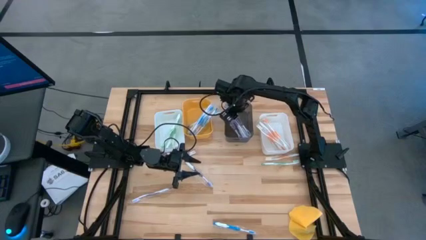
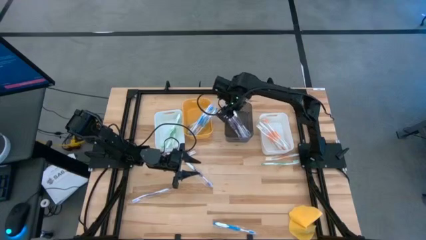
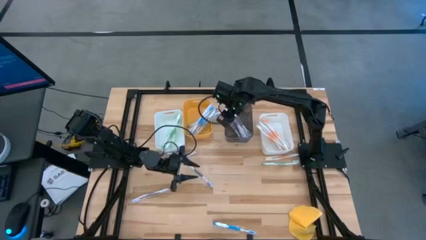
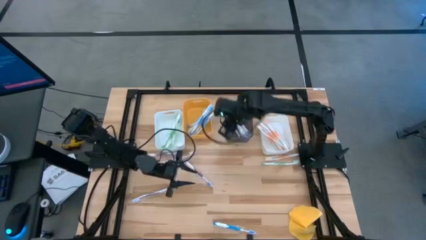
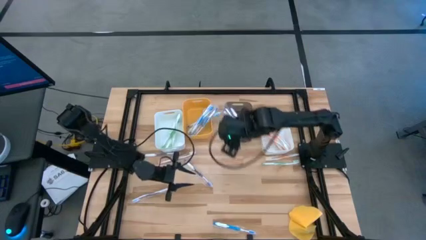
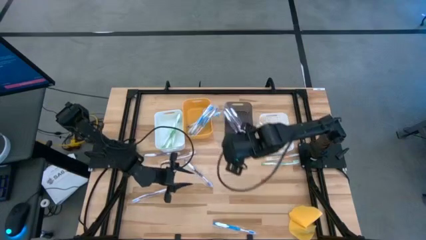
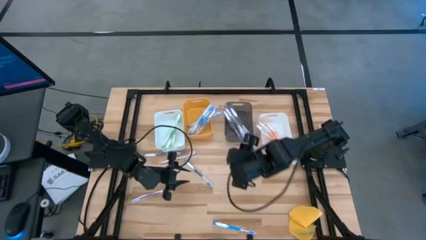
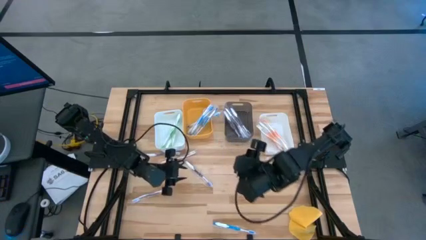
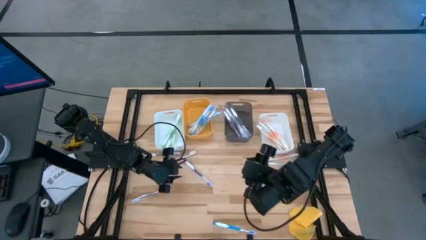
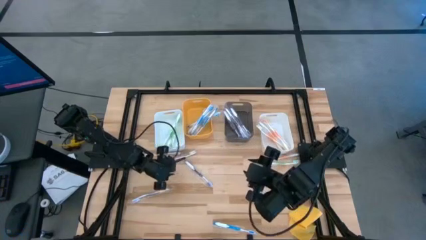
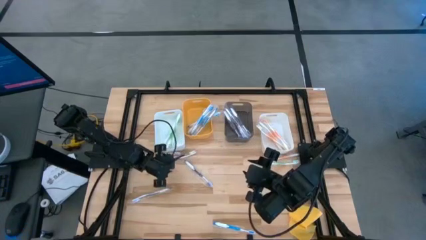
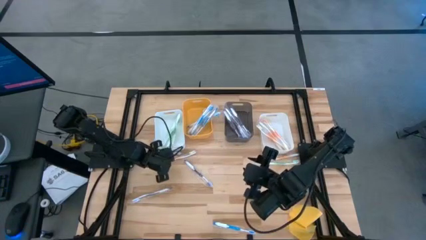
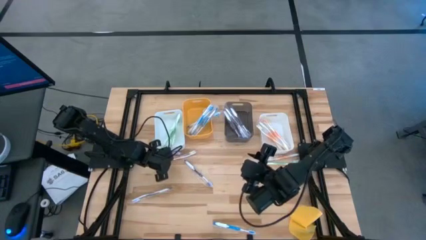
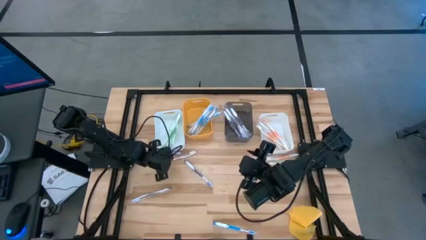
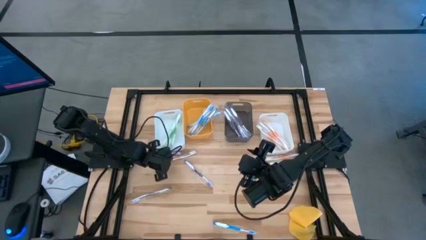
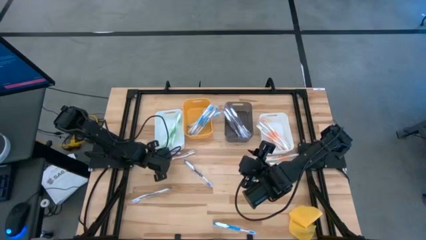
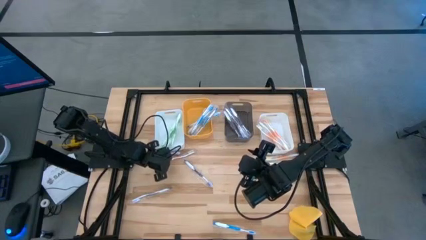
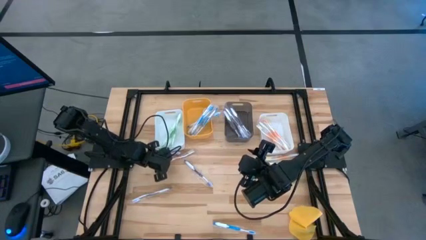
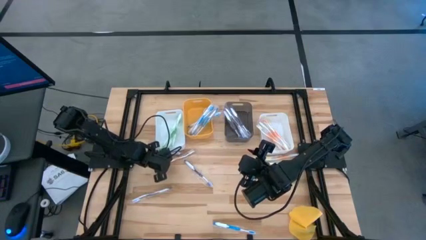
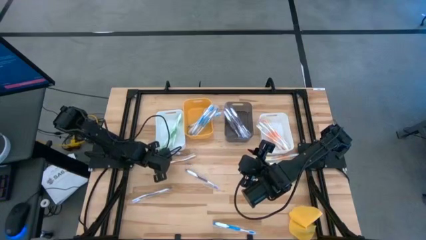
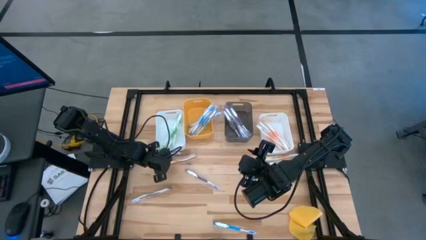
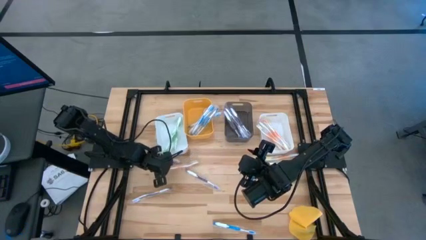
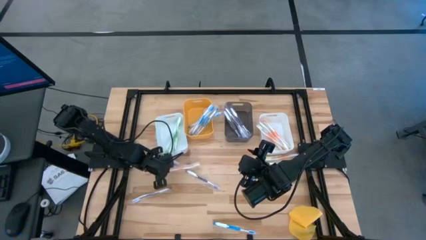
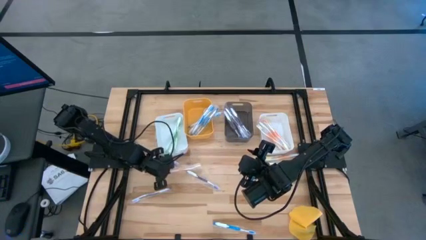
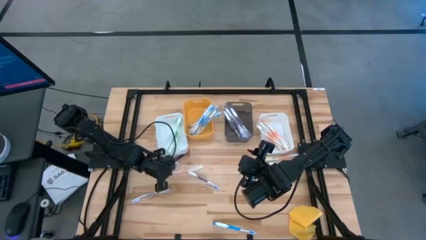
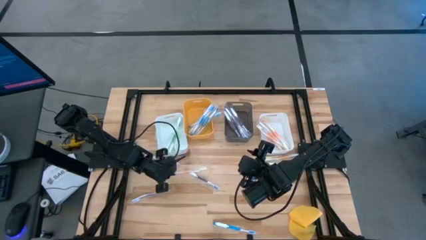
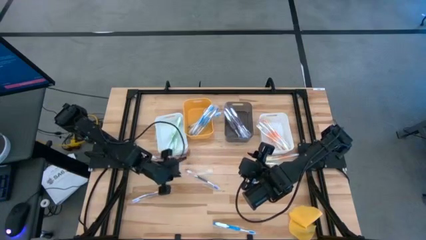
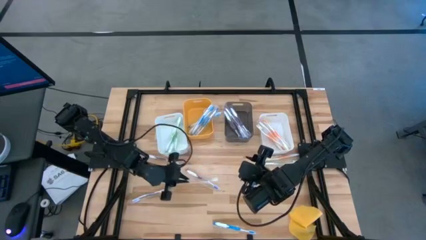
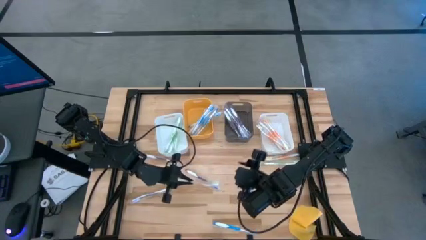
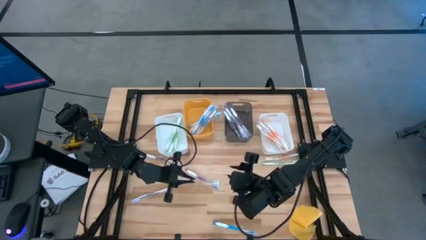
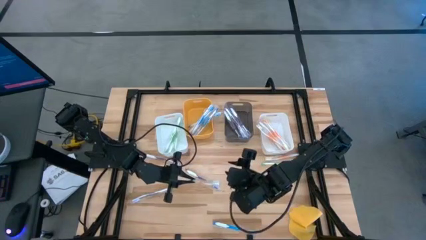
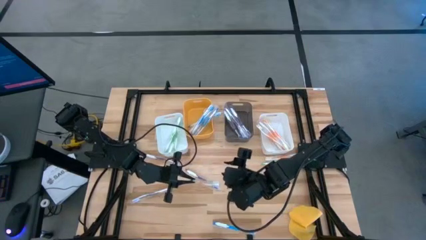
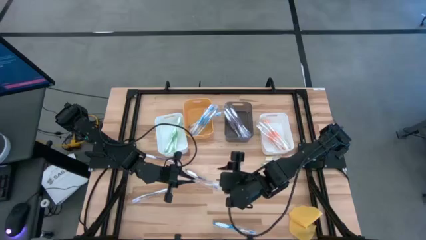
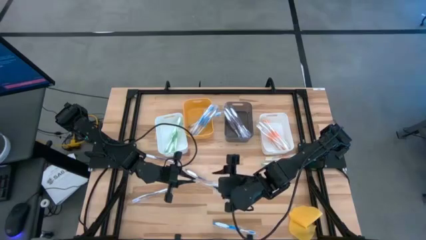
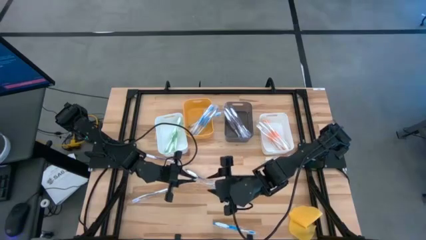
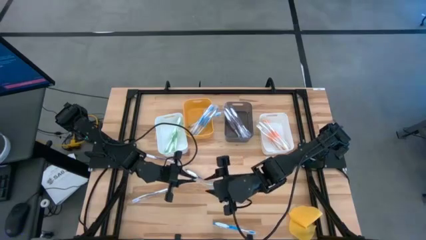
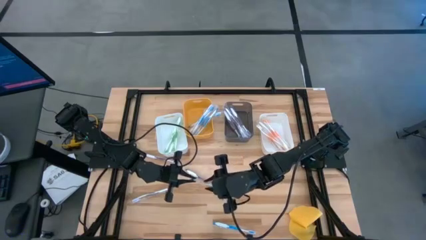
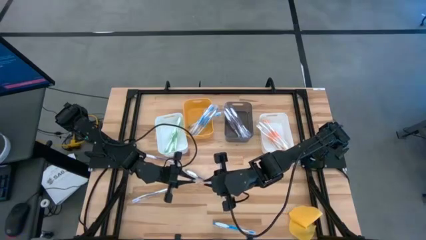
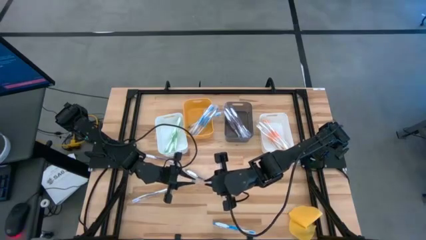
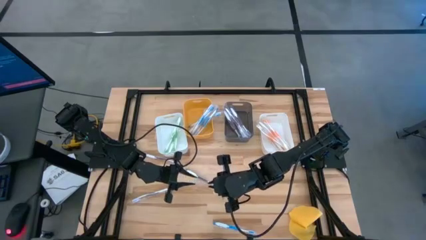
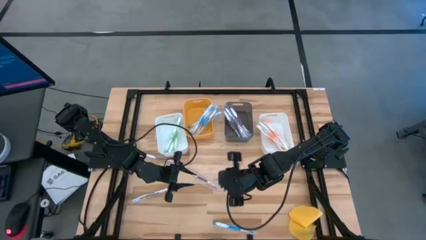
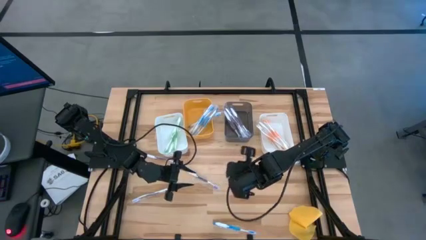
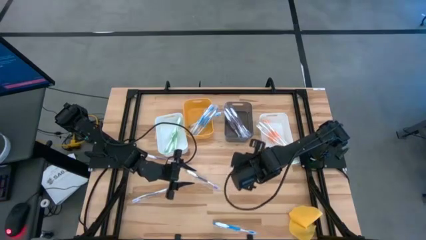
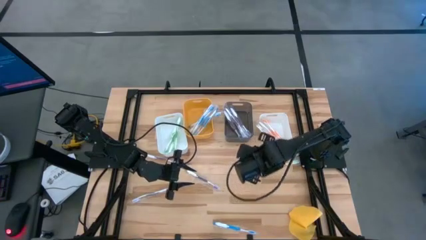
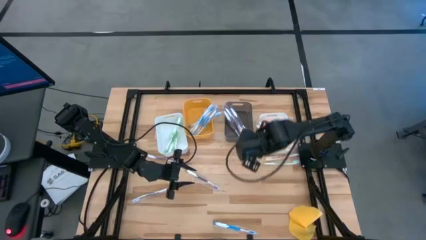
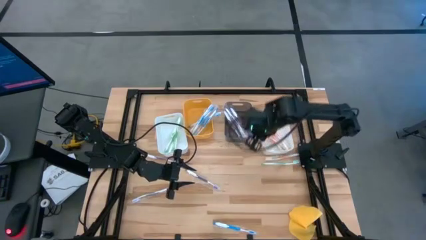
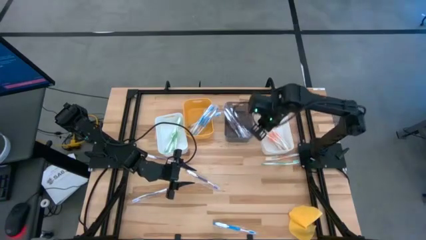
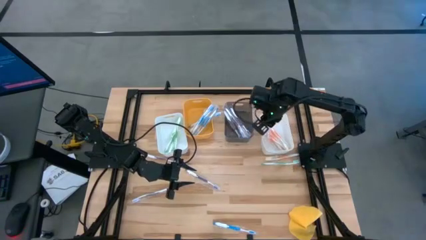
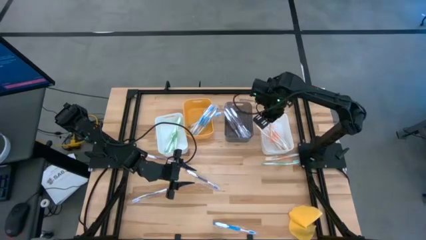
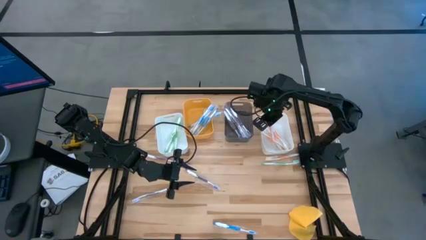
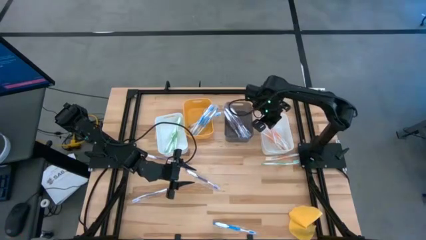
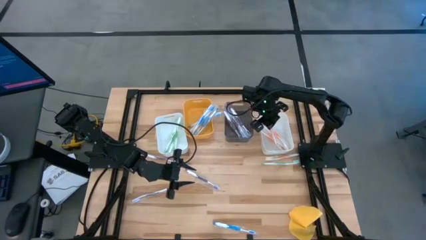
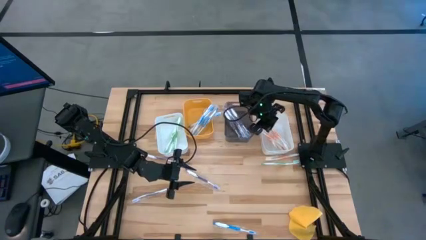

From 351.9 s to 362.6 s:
Task: Pick & Place Toothbrushes
Put the left orange toothbrush into the right white bin

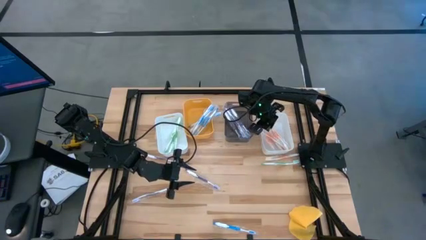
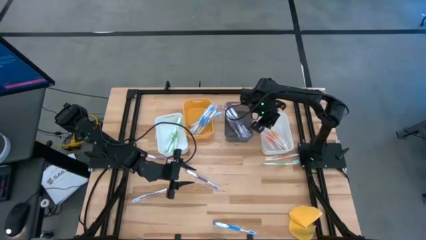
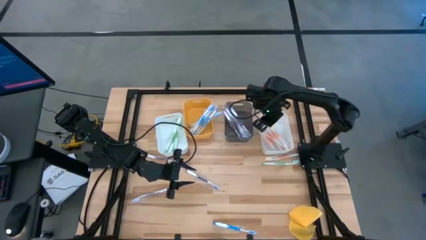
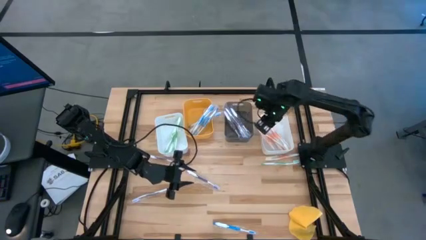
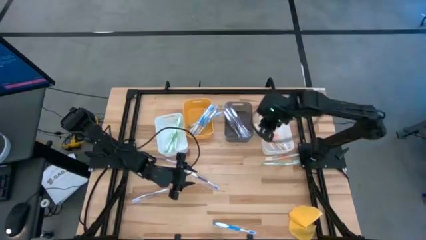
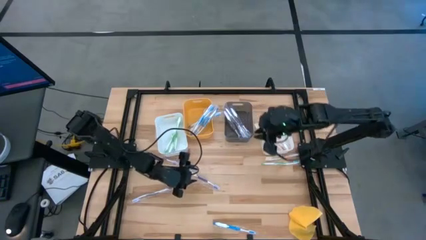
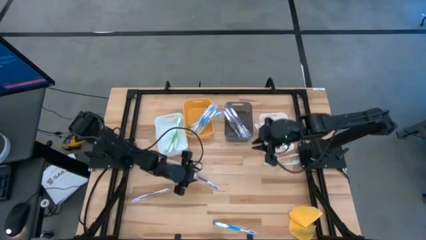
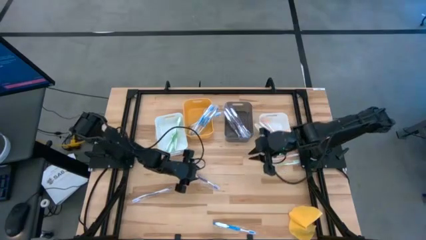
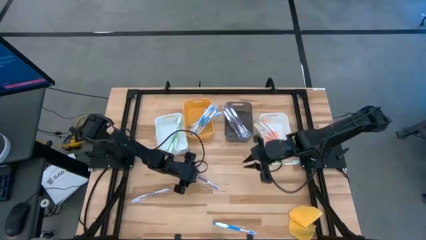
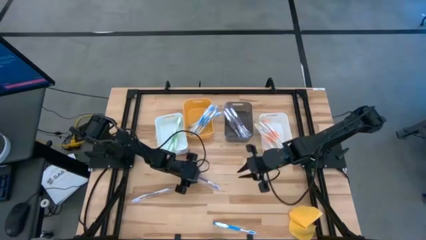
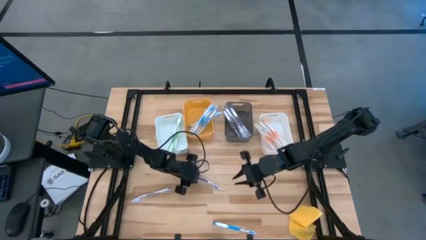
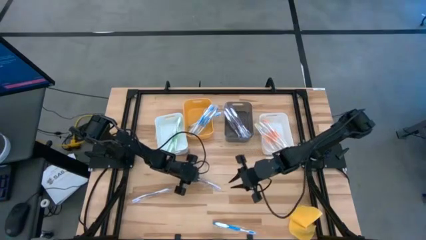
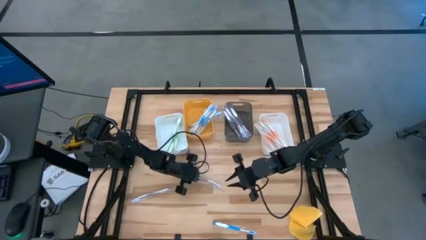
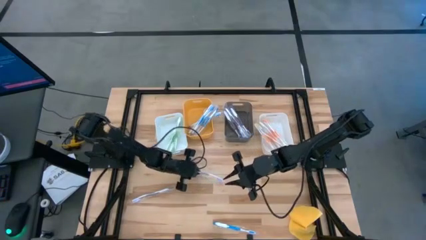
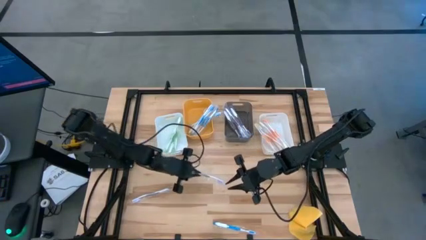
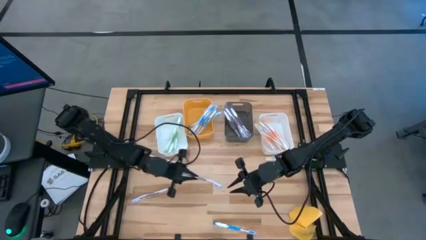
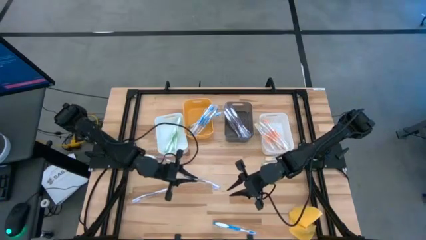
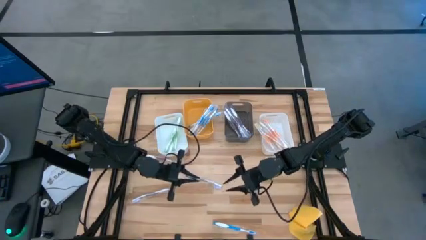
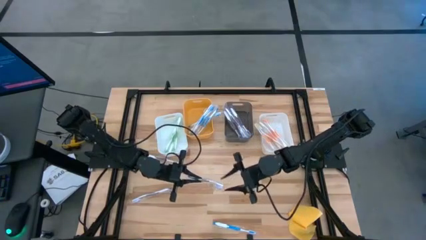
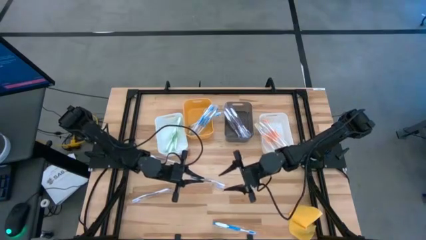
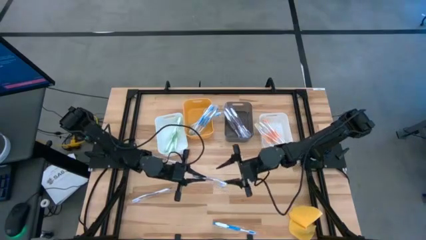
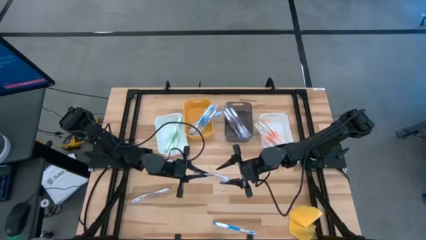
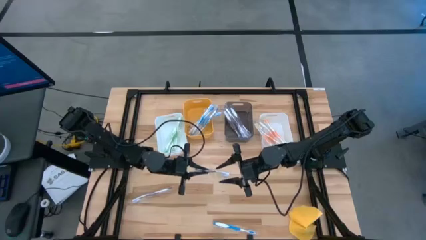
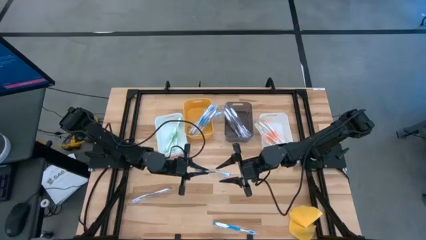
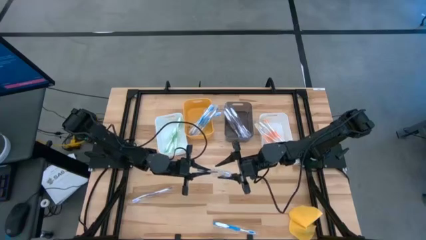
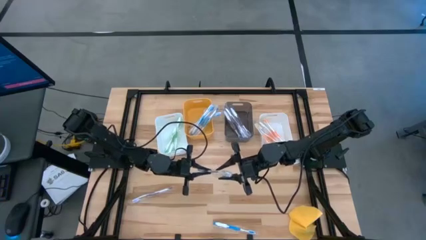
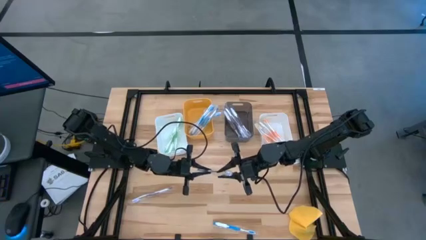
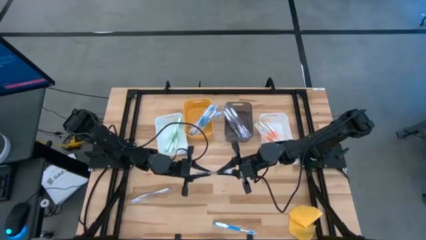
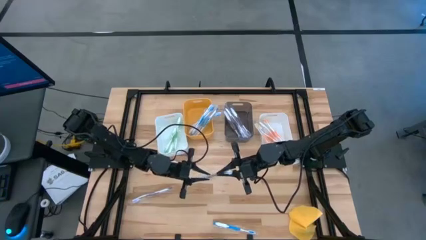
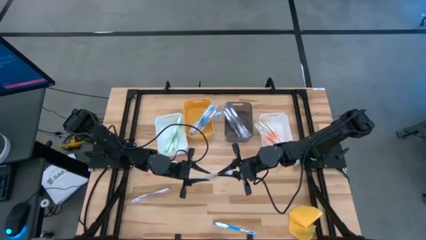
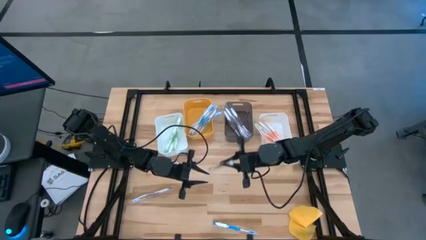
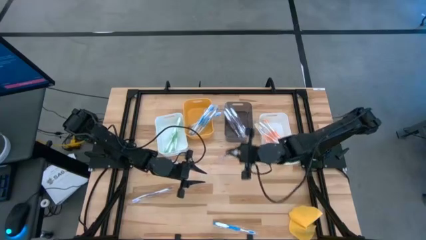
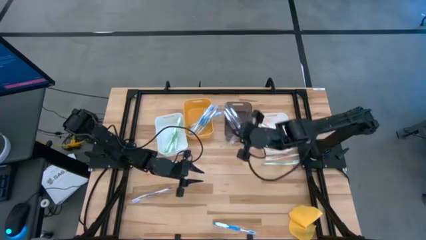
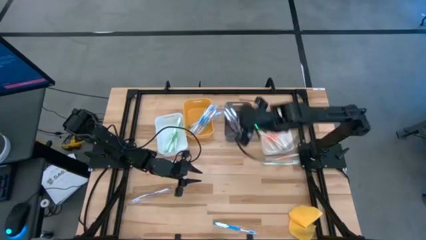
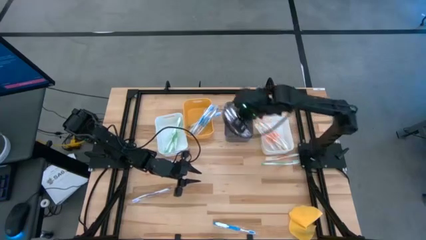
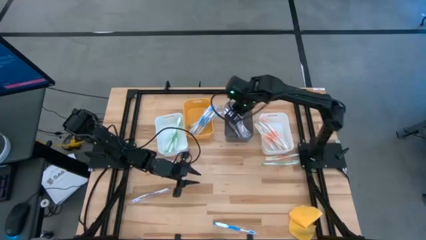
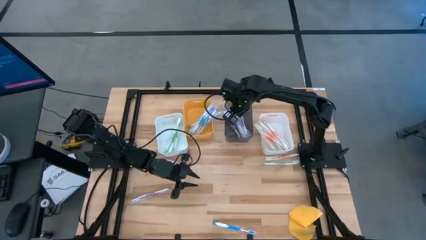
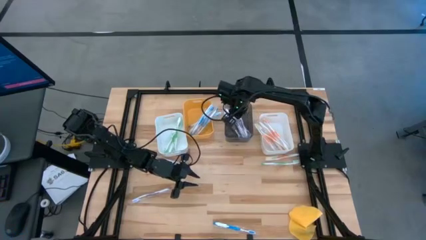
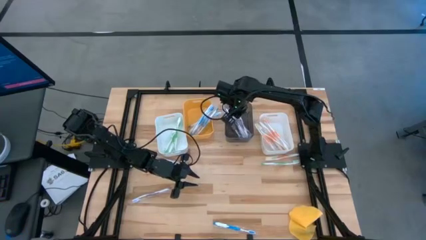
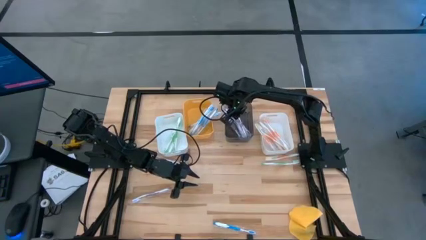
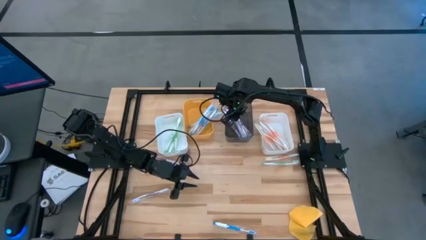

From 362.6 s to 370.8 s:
Put the right purple toothbrush into the black transparent bin
